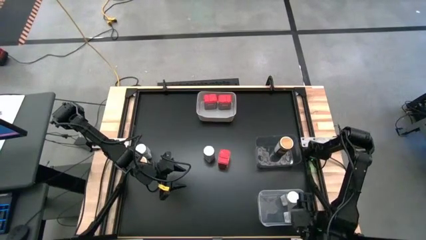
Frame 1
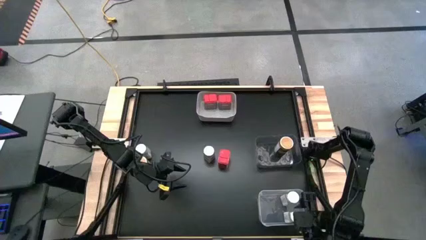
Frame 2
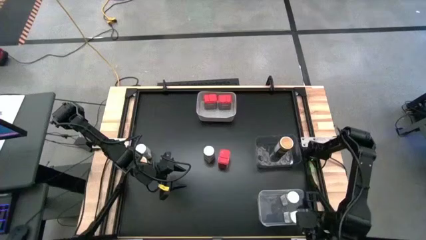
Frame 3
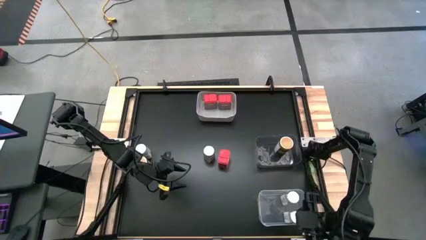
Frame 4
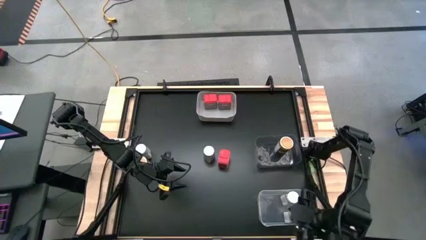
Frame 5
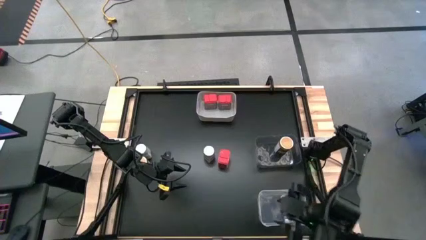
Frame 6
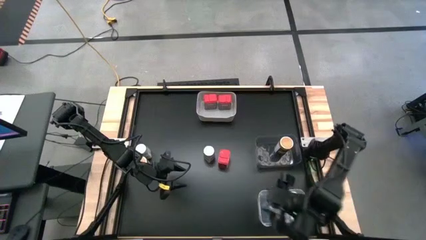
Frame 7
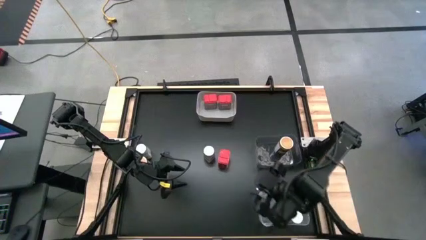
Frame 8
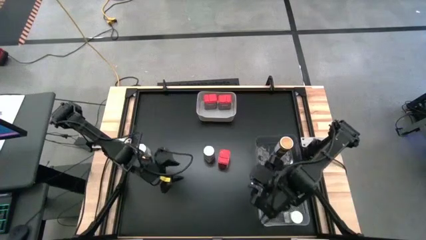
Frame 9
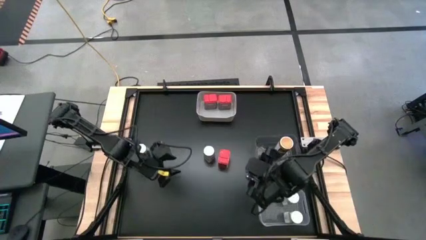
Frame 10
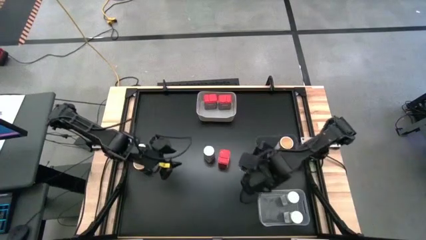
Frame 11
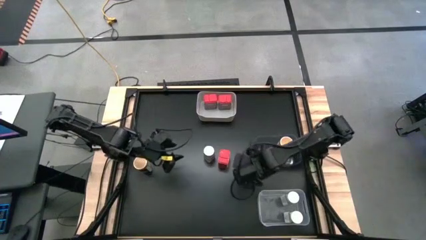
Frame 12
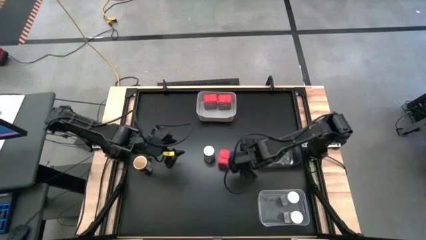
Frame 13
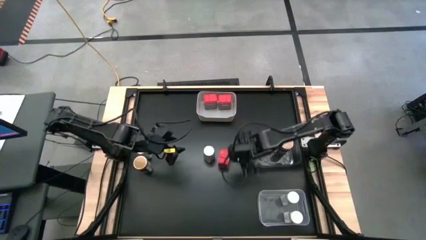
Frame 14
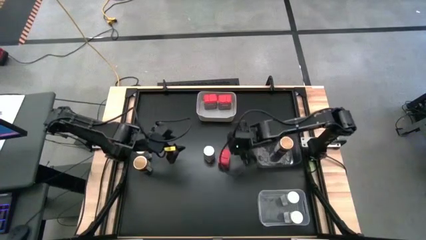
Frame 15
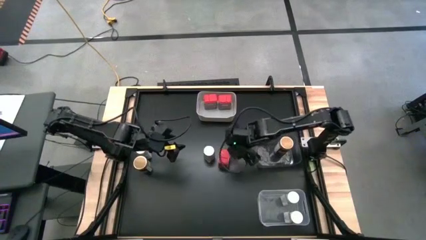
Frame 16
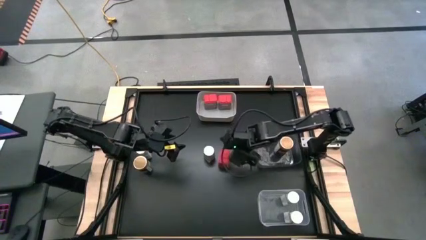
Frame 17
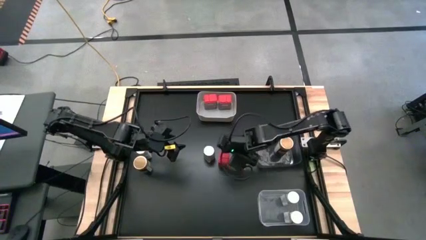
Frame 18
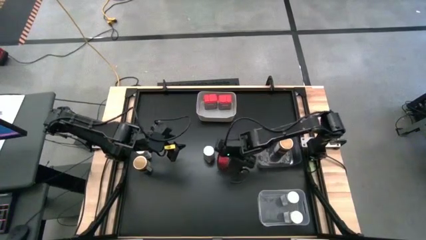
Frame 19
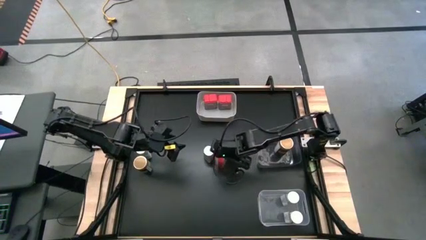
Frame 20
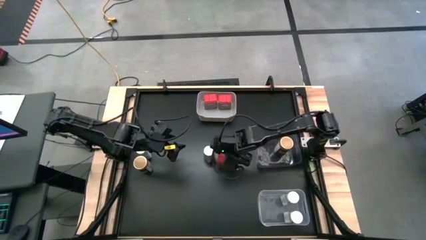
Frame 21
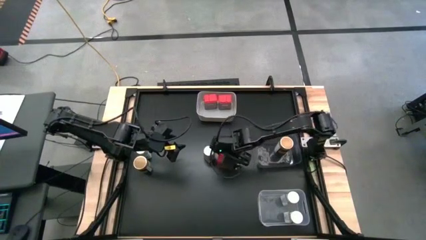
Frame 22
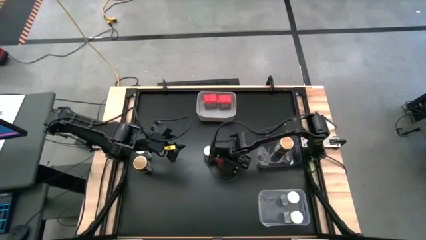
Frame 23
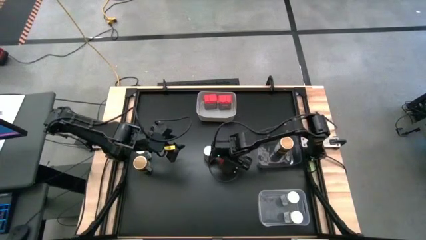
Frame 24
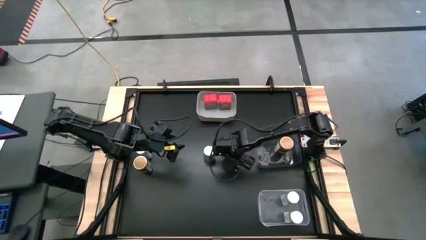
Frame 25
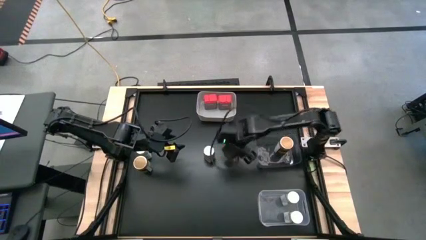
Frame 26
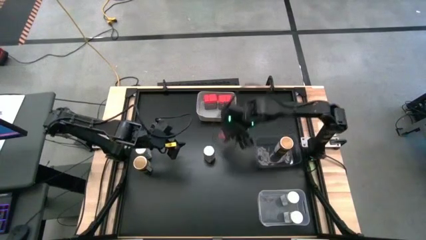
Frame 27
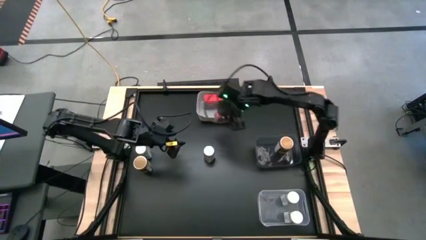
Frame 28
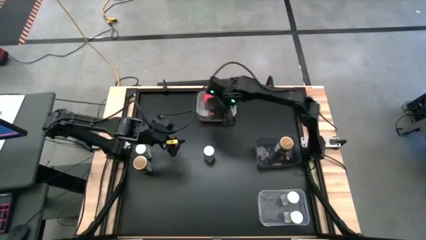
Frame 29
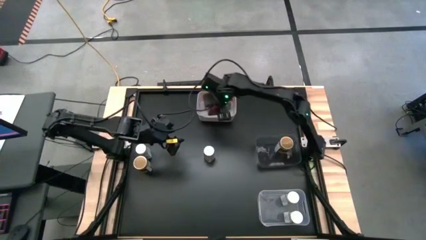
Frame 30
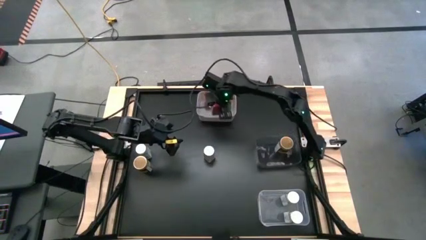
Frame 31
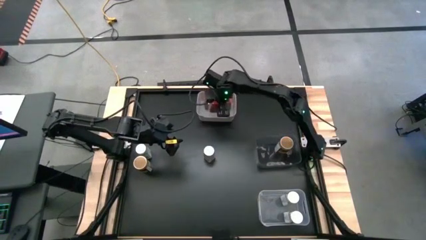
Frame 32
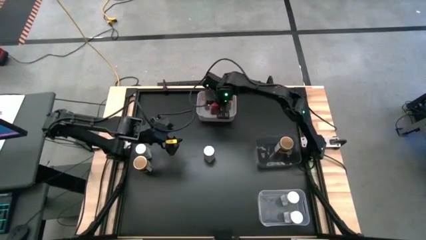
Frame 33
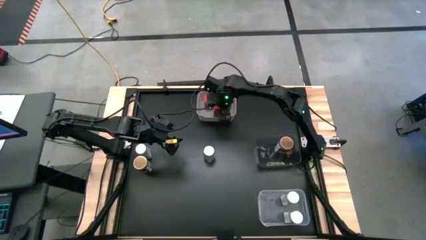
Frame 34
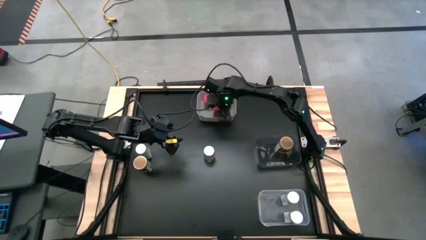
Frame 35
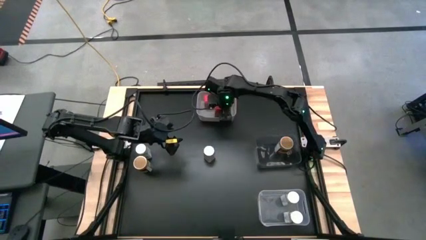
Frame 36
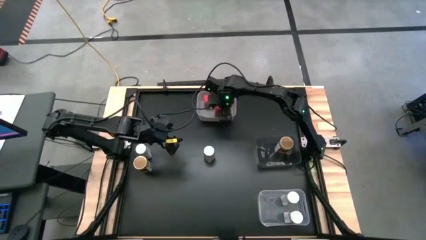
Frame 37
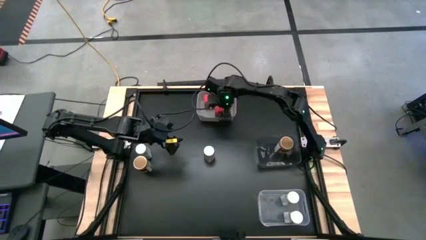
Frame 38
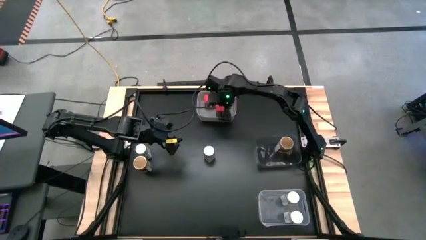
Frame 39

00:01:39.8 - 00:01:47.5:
Task: Sort spices by type
Put the red seasoning can into the gray bin

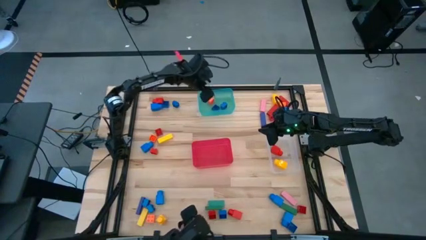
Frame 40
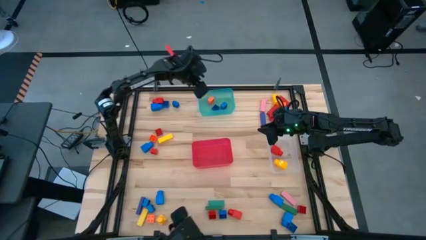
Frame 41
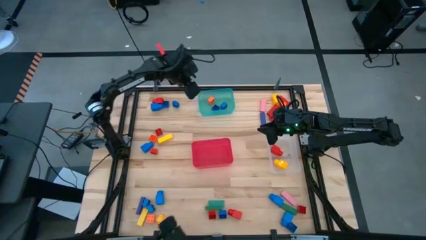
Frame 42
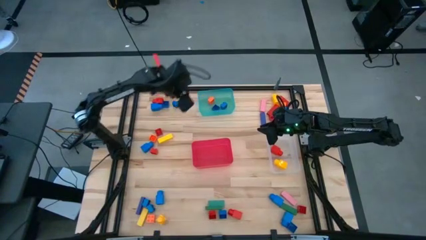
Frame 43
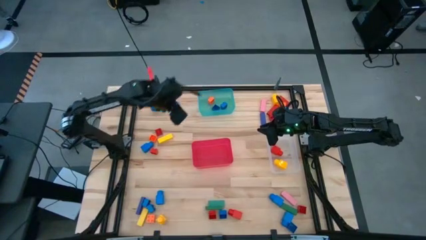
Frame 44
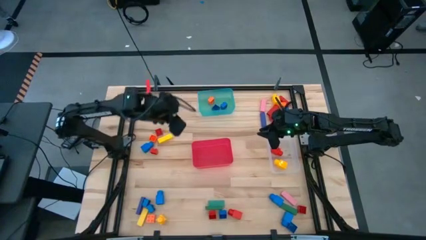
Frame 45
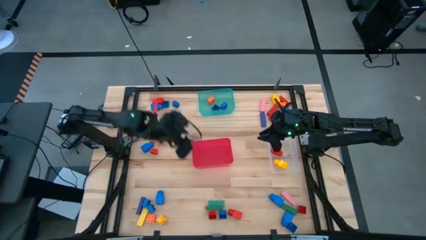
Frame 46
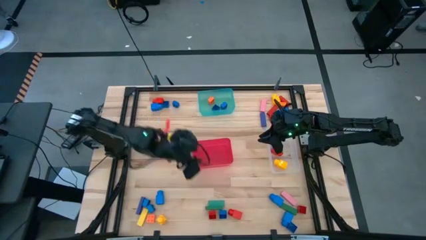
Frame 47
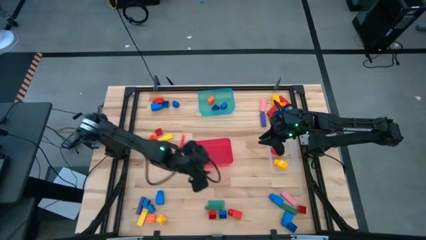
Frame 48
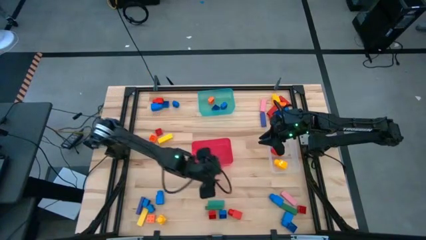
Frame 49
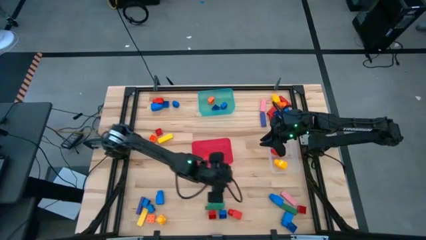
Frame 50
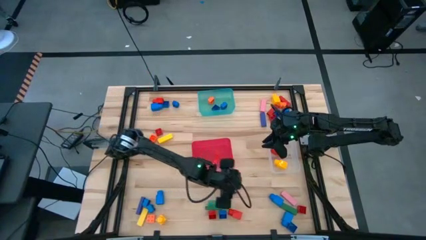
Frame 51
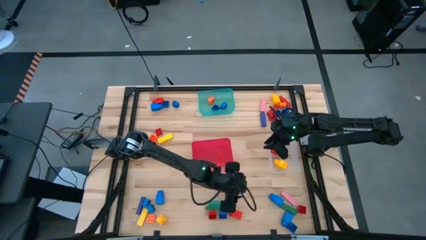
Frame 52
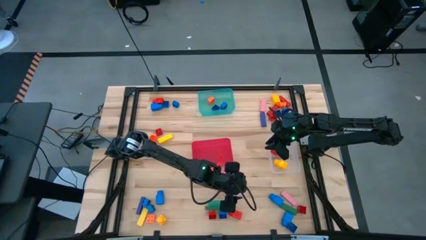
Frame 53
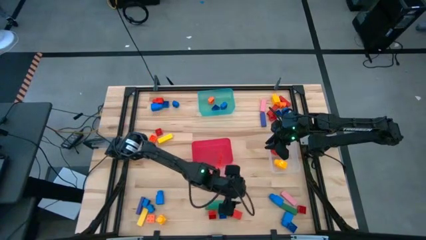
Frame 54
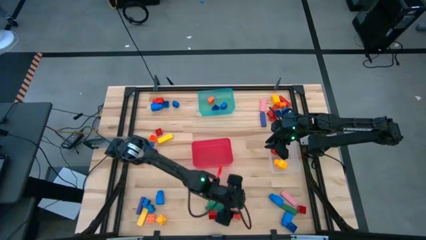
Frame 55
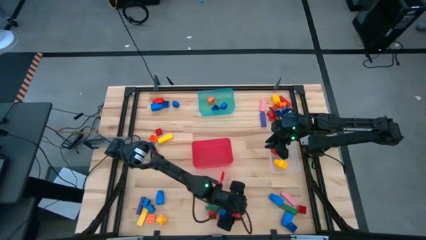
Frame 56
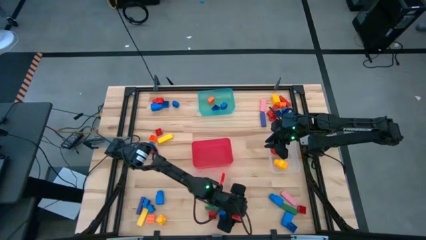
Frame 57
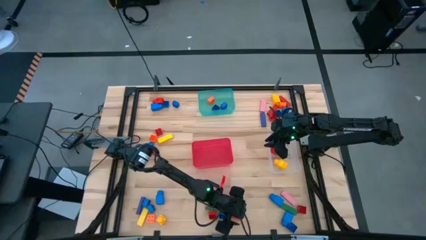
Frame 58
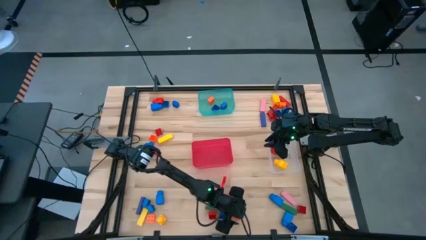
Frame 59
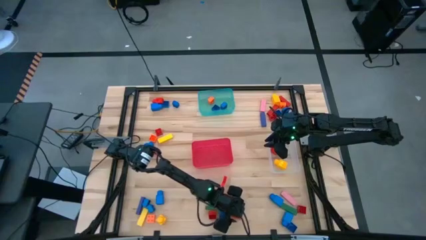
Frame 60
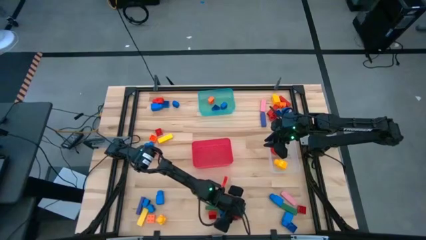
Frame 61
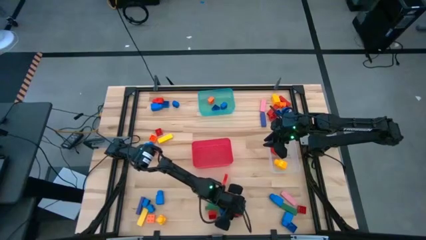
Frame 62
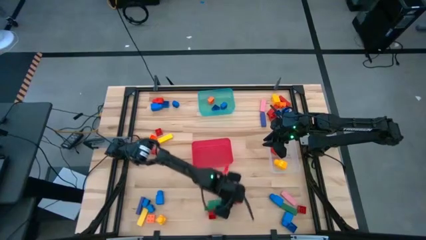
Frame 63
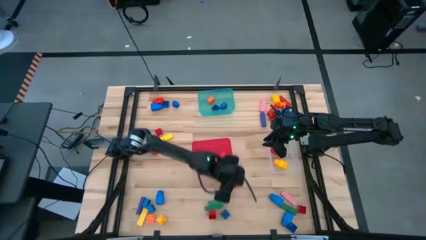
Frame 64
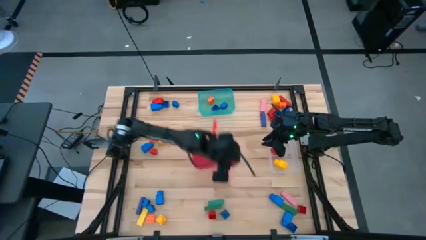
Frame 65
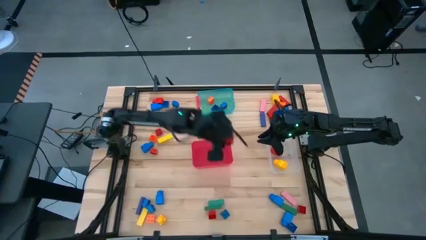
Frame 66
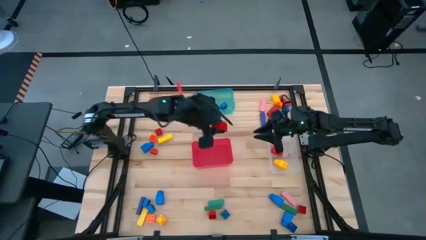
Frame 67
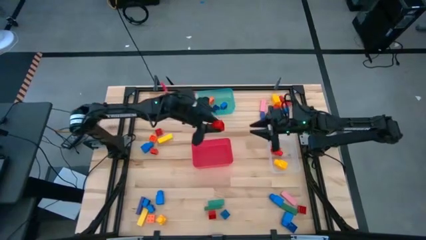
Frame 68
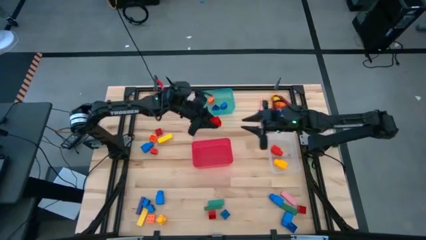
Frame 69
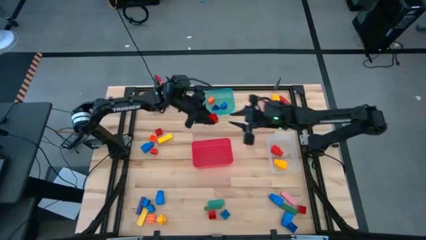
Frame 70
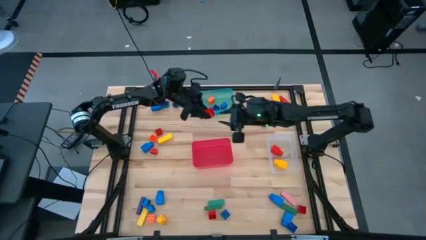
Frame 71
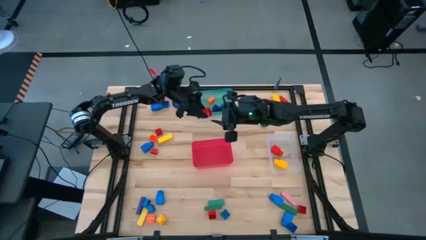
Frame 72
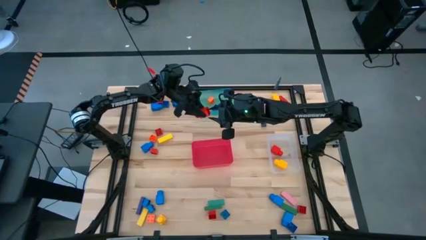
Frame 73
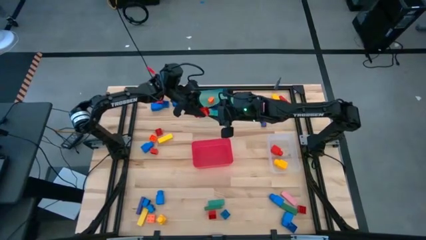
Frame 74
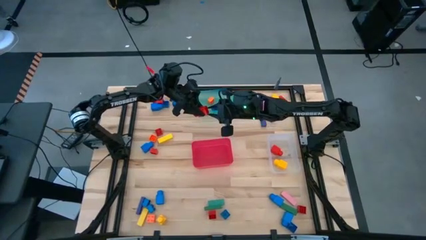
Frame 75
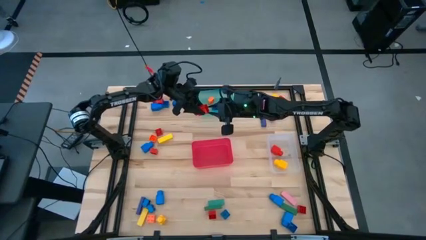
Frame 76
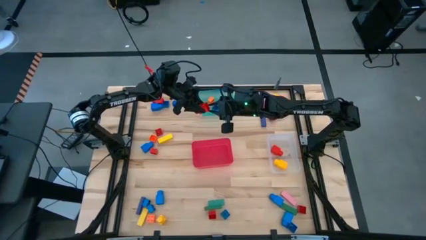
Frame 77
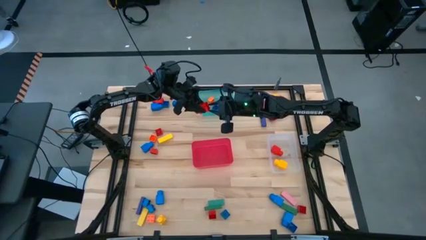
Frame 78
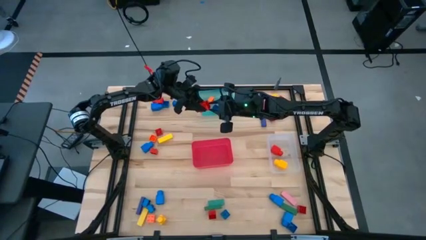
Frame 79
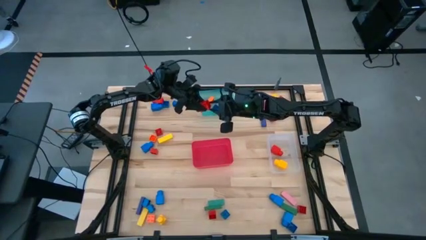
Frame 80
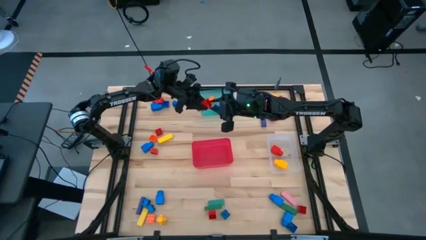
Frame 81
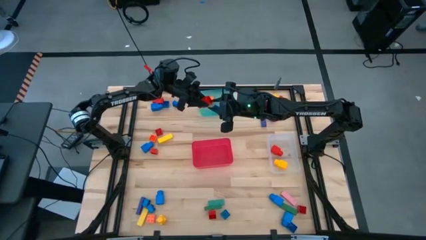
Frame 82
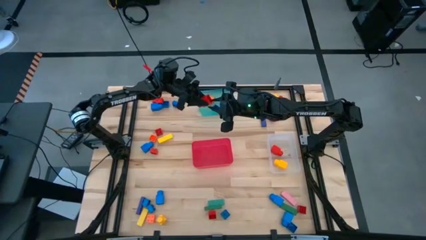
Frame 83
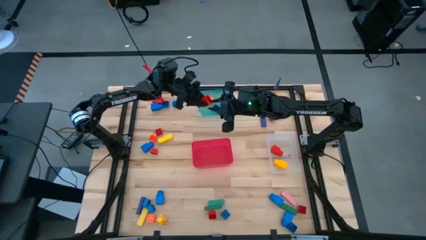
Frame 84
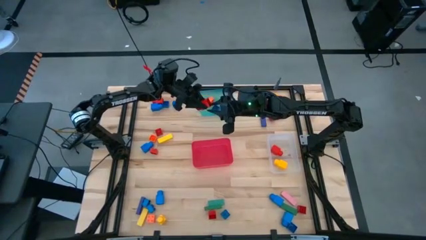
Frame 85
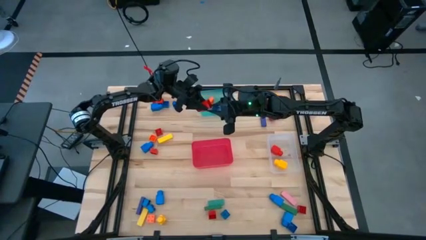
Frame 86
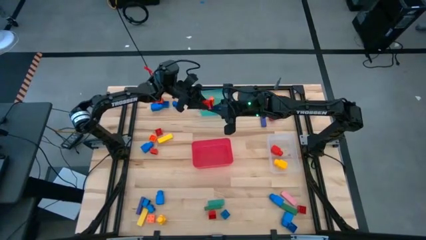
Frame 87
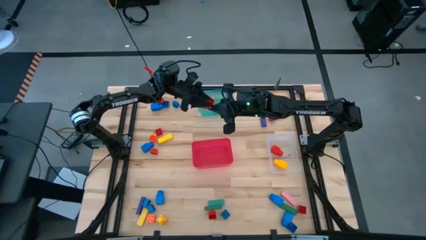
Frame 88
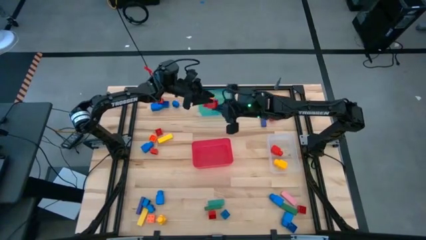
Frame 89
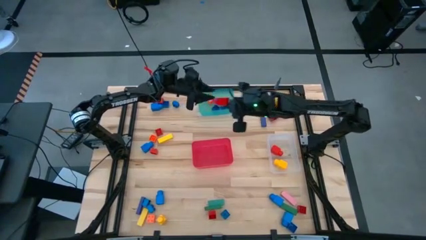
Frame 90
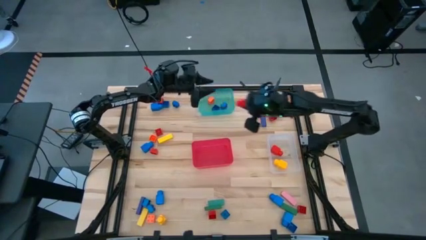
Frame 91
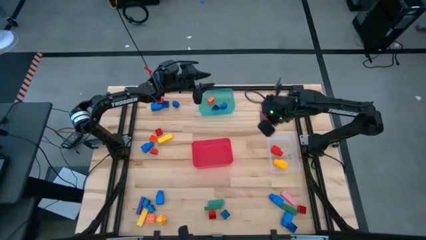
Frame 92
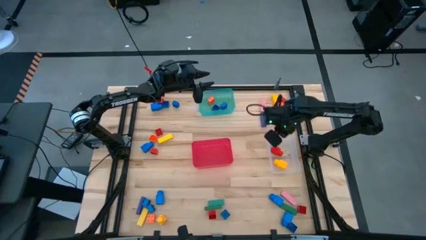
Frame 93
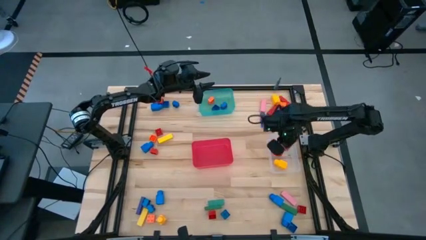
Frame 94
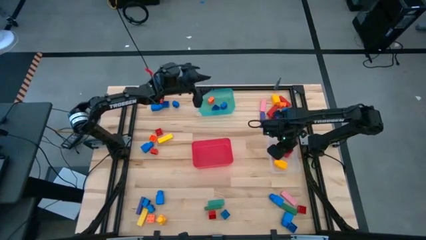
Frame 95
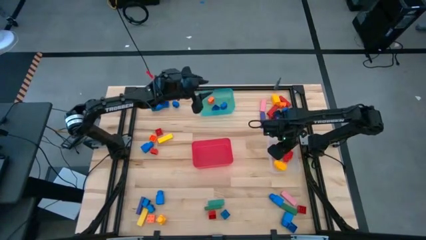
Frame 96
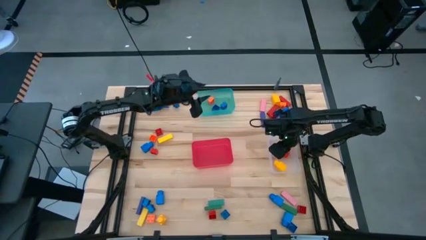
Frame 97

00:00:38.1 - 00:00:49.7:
Task: Sort blocks by size
Put the red 1 stud game piece into the transparent bin
